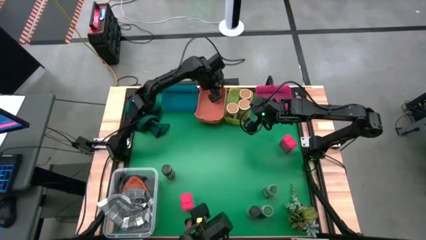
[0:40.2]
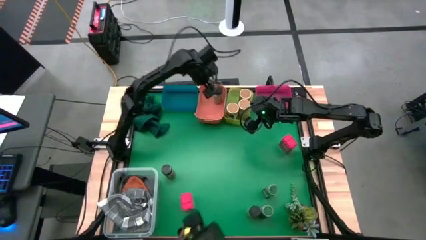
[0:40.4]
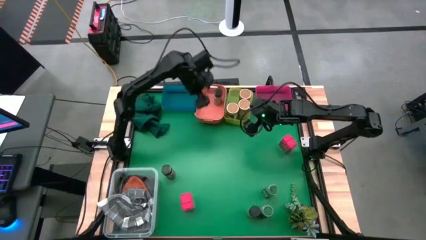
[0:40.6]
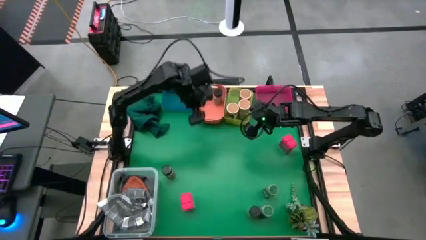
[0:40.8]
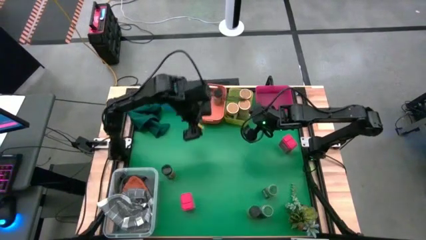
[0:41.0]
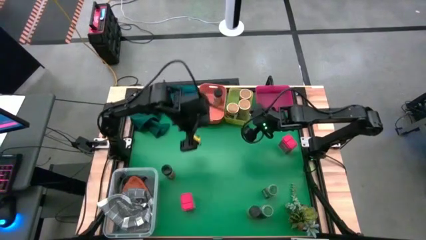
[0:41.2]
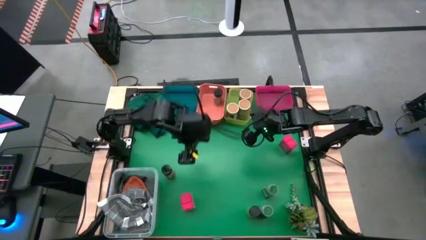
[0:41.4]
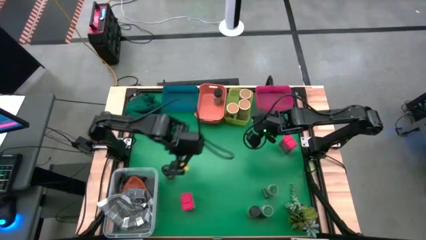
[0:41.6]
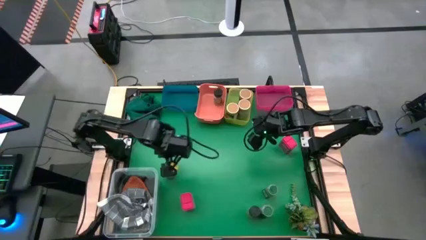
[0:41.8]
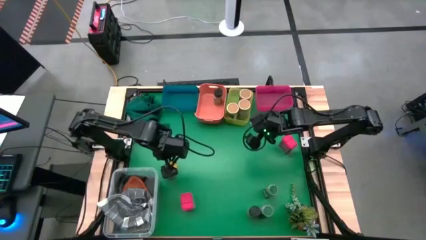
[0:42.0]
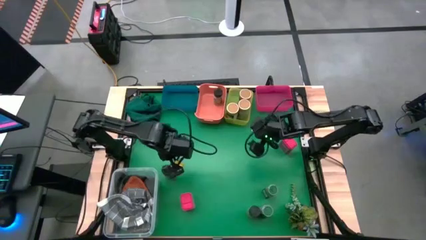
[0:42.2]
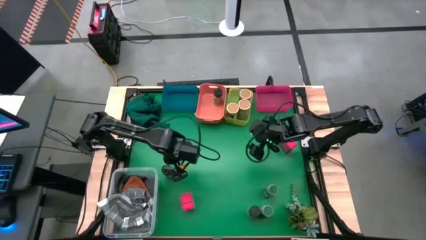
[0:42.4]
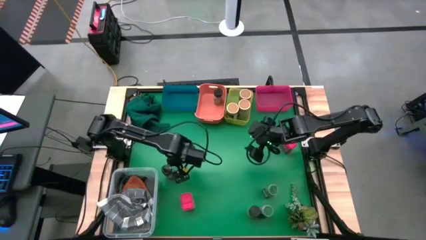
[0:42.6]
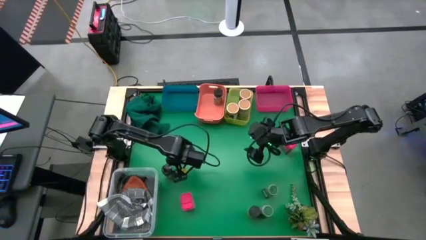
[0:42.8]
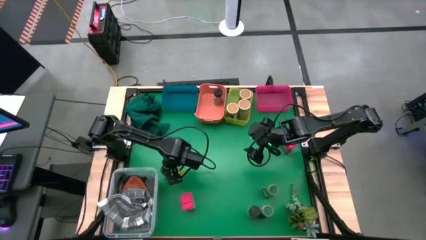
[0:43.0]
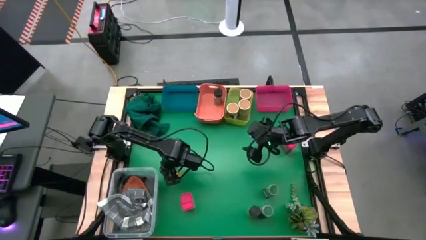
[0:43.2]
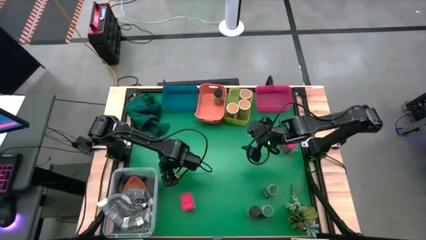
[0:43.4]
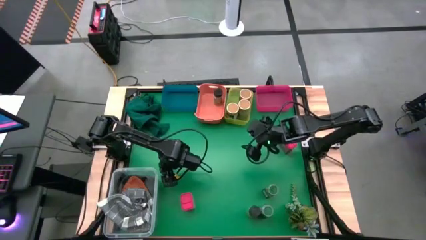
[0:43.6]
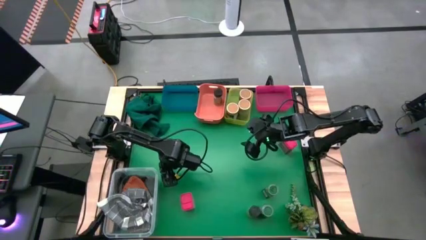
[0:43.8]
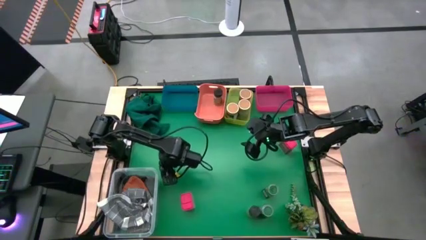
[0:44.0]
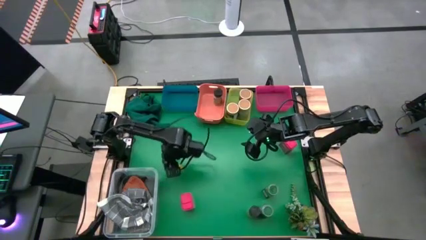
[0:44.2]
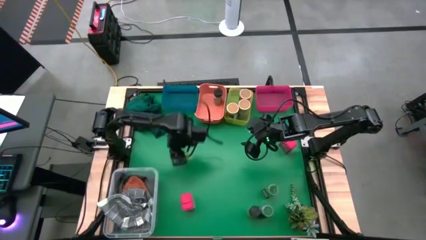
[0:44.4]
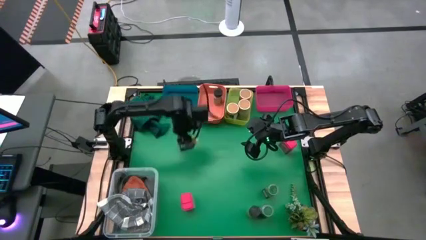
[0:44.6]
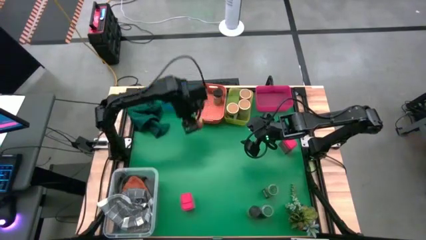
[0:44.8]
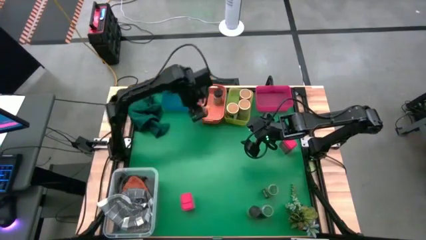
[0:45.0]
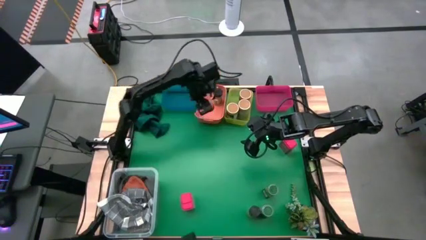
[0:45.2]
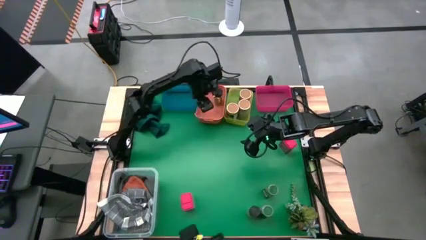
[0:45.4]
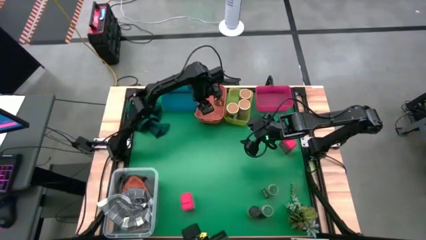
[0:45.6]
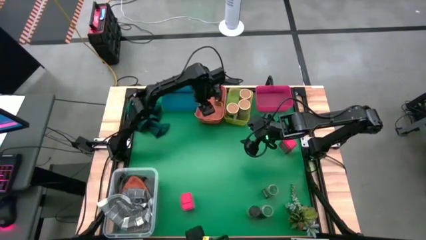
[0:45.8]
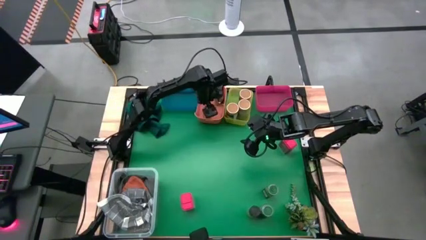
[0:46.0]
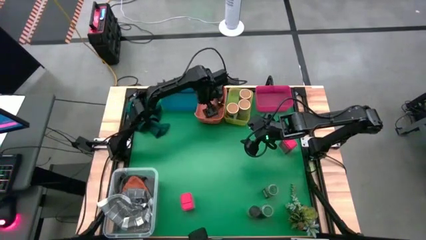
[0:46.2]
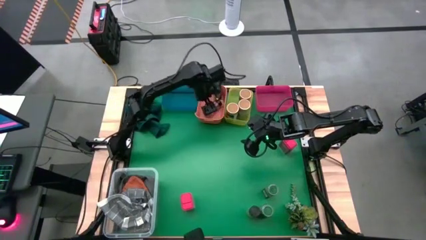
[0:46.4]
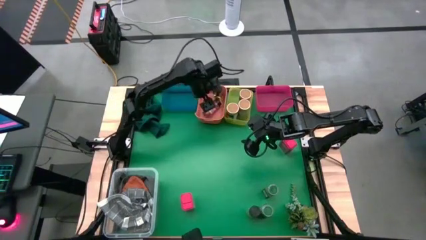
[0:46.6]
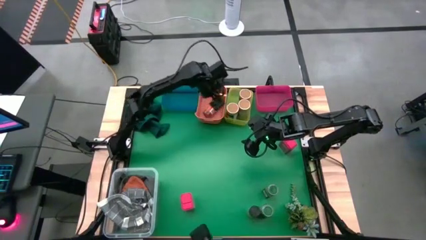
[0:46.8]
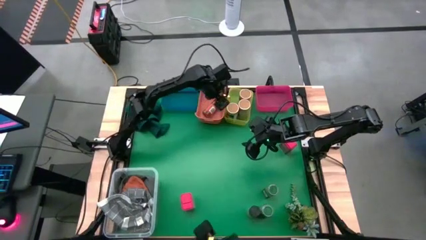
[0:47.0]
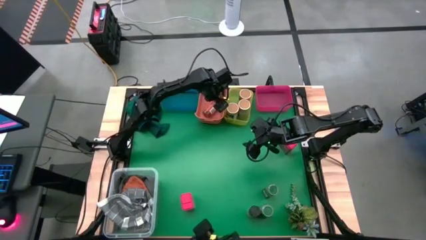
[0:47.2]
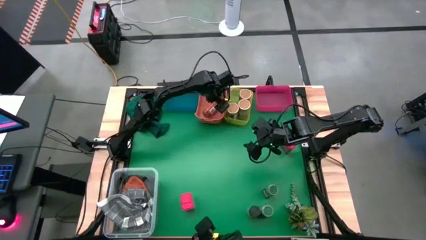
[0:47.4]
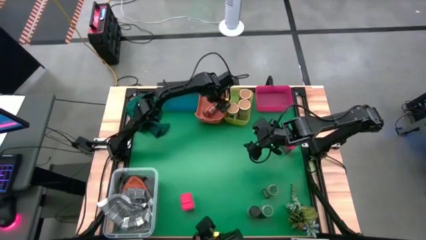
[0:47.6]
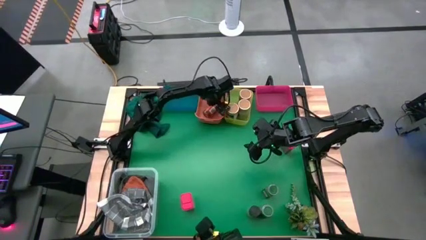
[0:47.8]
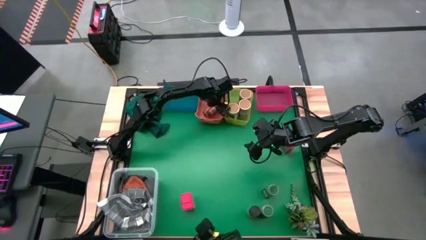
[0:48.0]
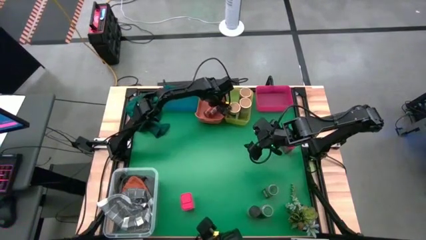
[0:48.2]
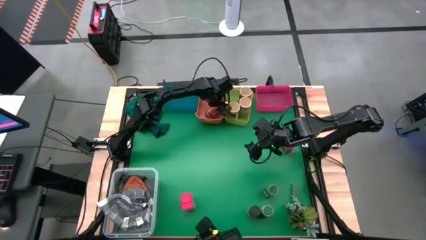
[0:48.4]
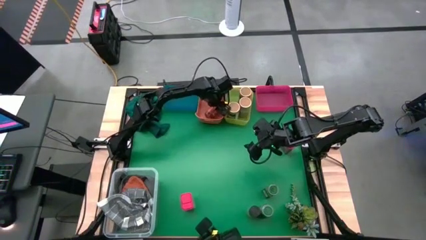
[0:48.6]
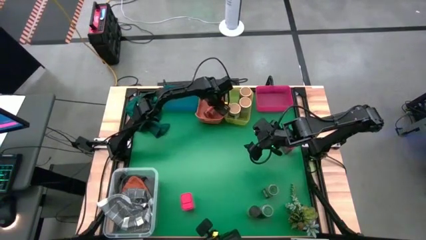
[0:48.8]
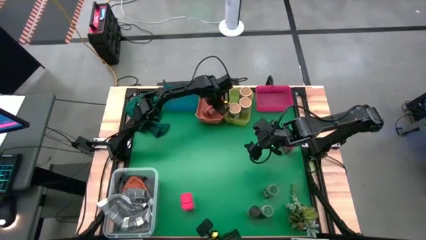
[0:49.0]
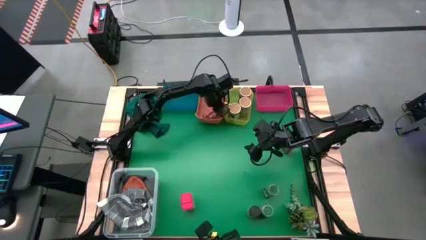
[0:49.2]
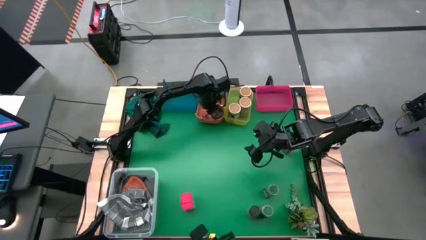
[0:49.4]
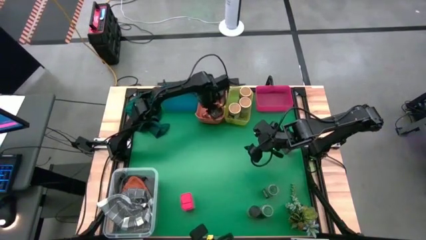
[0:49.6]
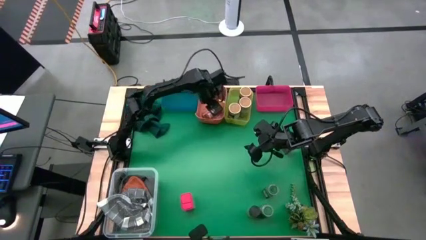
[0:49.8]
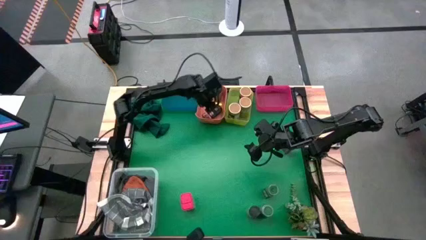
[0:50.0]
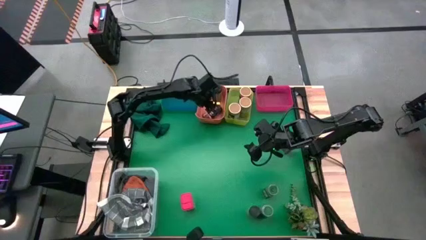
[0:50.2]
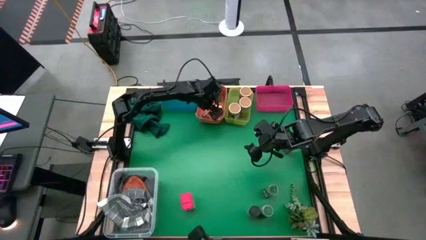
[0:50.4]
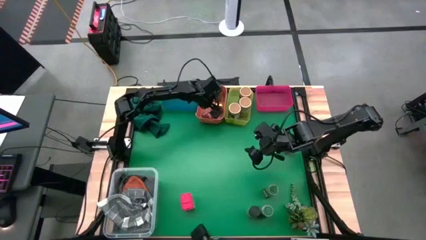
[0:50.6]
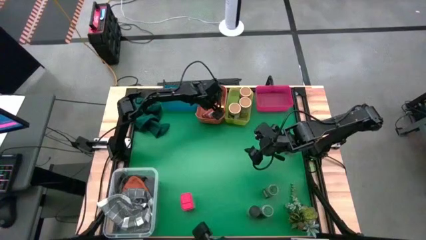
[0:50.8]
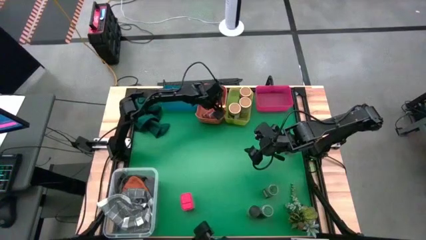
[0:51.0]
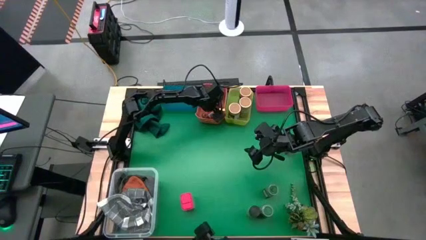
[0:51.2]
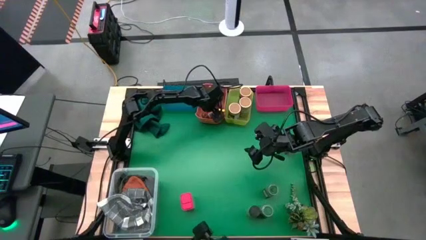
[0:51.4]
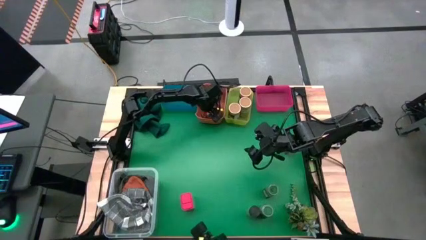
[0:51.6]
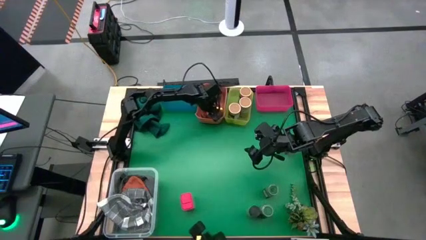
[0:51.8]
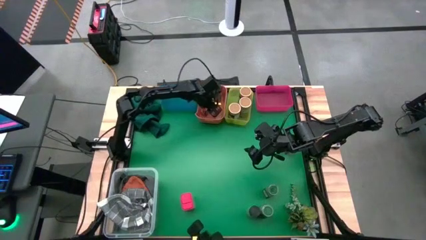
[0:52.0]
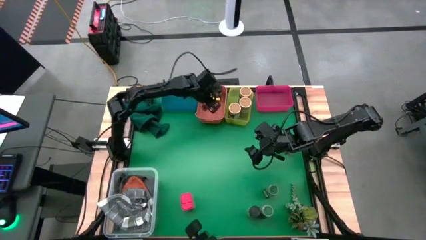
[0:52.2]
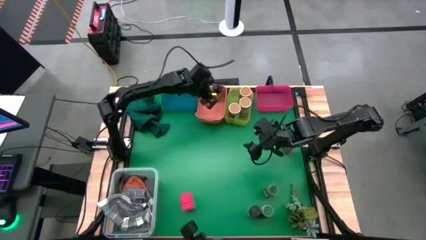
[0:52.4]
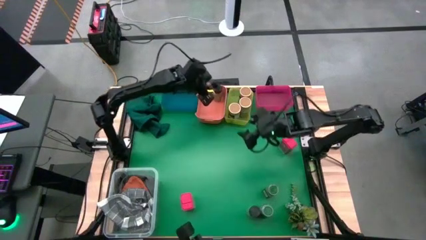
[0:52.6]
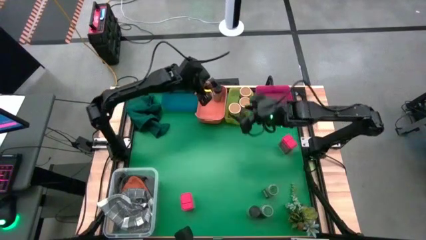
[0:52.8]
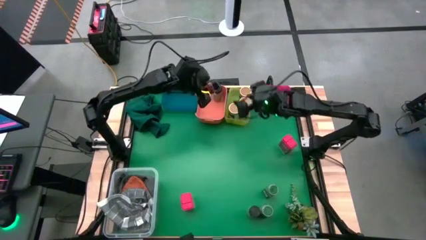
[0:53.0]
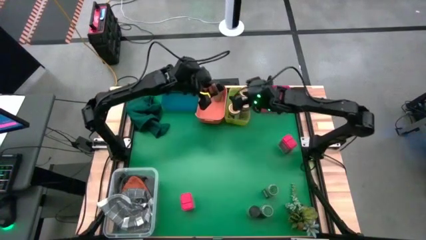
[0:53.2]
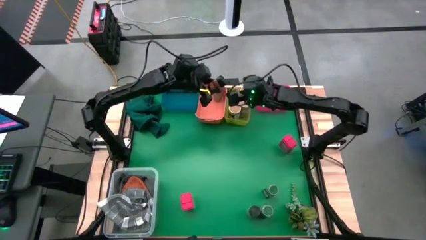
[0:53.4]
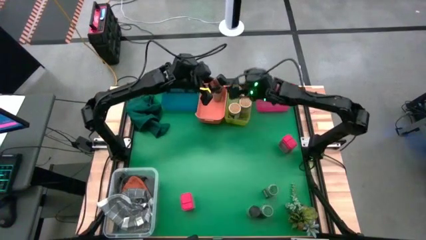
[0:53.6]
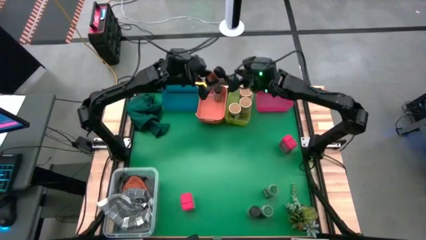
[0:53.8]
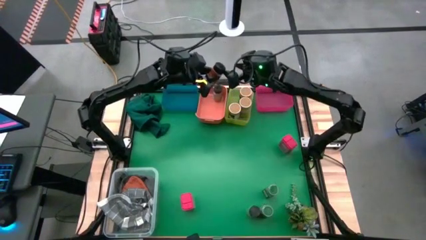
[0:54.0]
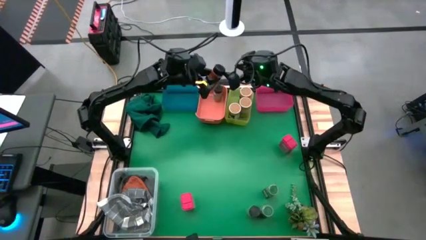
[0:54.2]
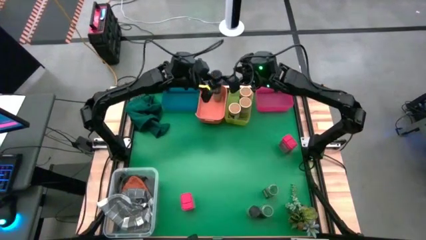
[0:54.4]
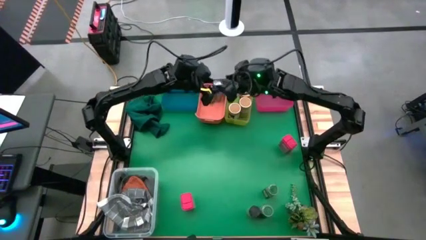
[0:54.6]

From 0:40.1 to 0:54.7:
Task: Sort spices by type
Put the left black seasoning bottle into the orange bin
